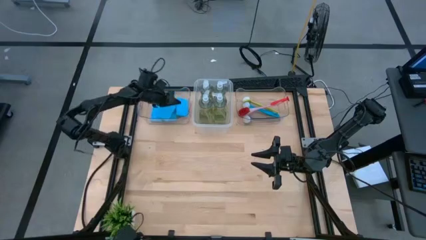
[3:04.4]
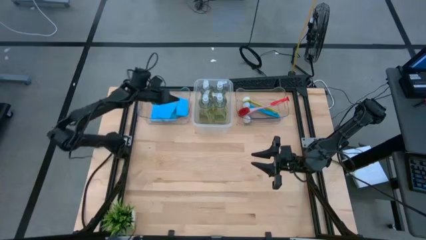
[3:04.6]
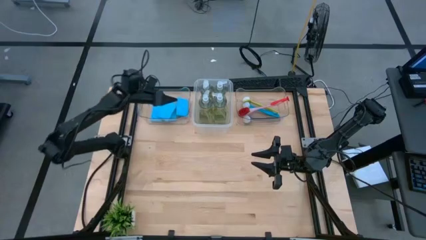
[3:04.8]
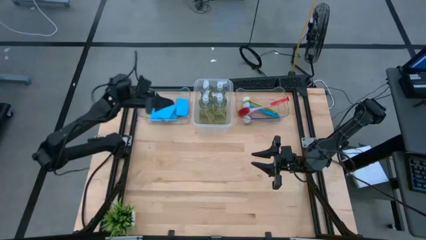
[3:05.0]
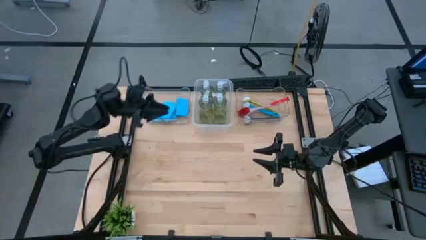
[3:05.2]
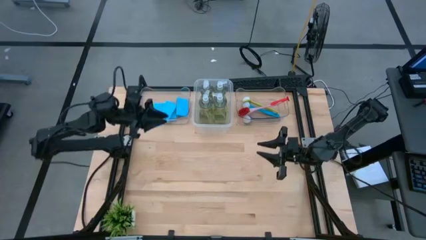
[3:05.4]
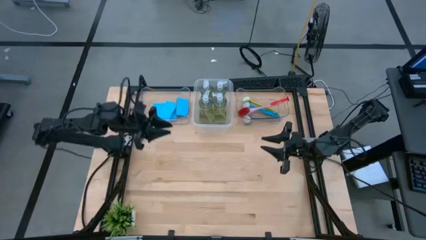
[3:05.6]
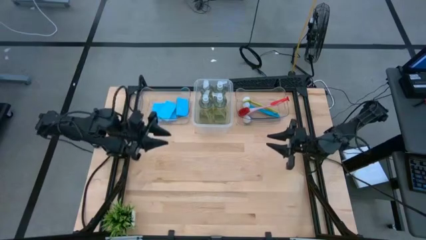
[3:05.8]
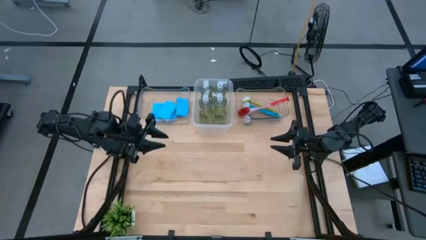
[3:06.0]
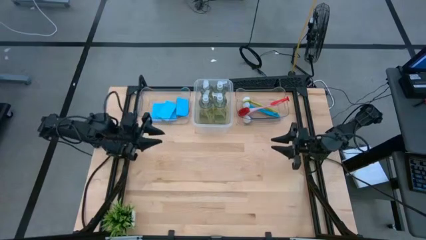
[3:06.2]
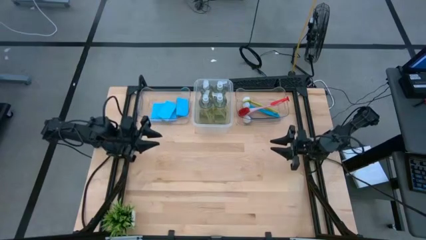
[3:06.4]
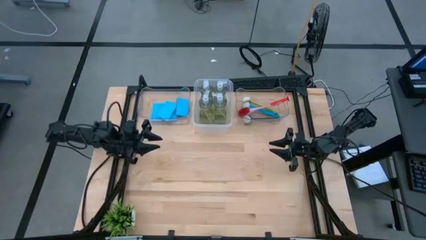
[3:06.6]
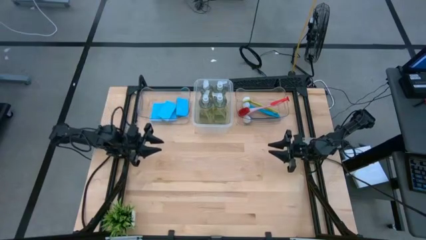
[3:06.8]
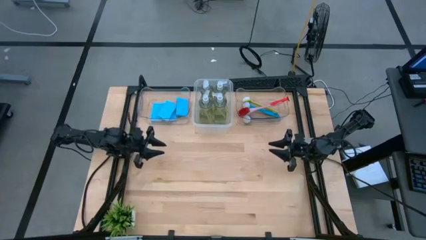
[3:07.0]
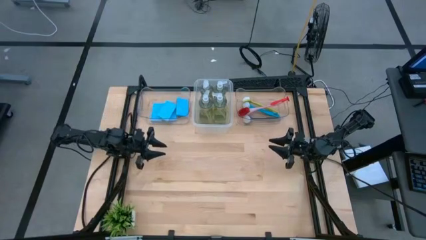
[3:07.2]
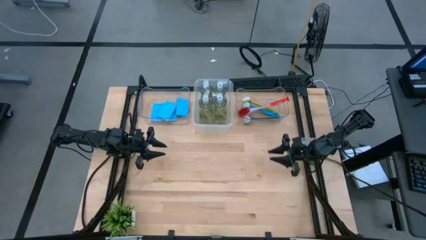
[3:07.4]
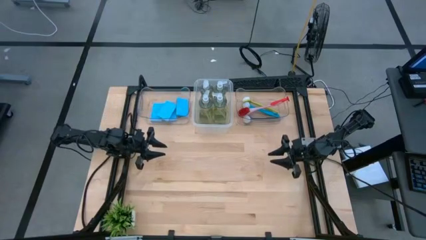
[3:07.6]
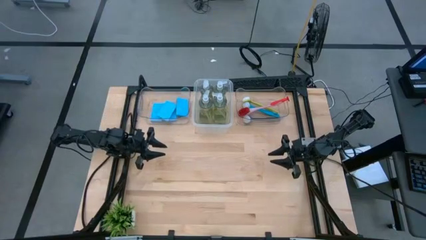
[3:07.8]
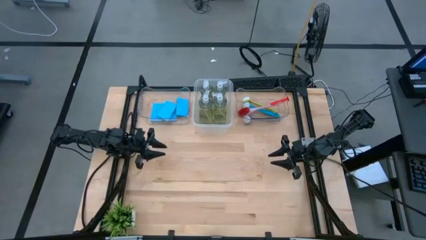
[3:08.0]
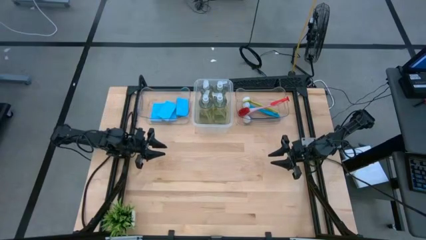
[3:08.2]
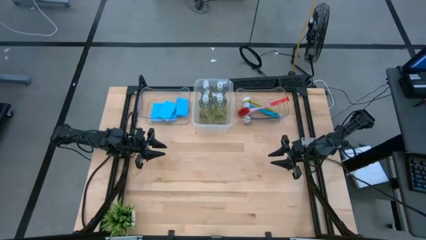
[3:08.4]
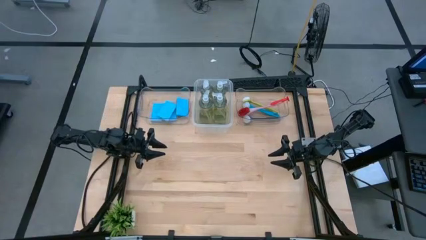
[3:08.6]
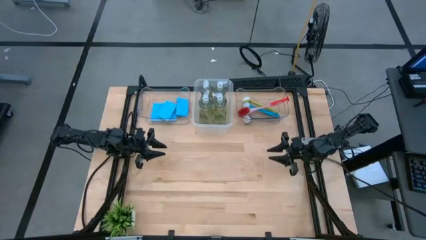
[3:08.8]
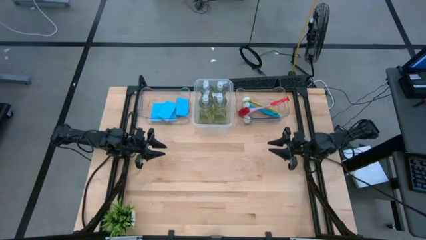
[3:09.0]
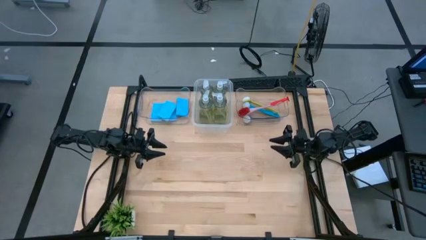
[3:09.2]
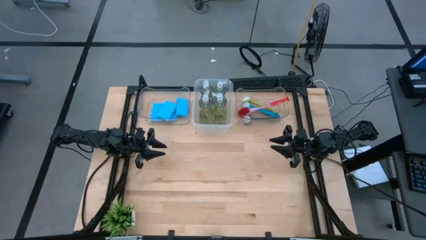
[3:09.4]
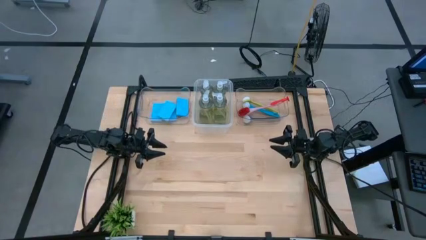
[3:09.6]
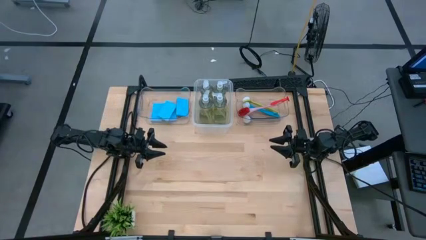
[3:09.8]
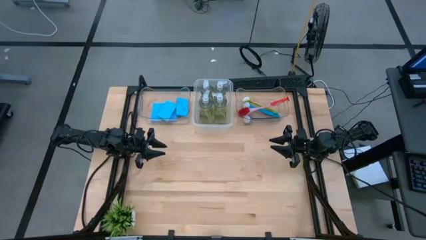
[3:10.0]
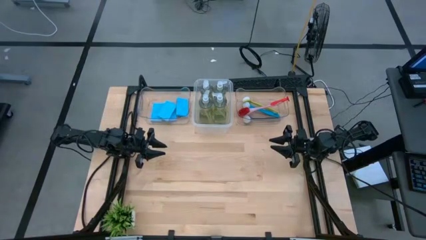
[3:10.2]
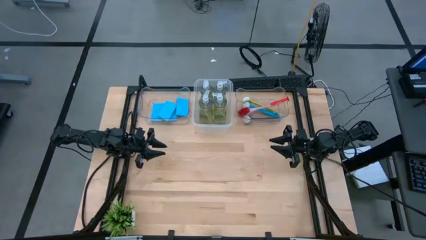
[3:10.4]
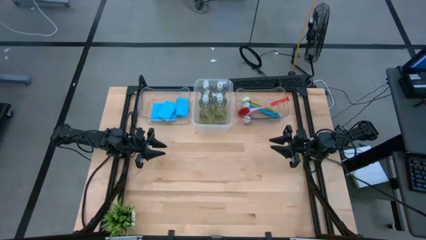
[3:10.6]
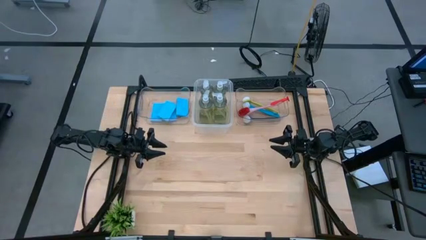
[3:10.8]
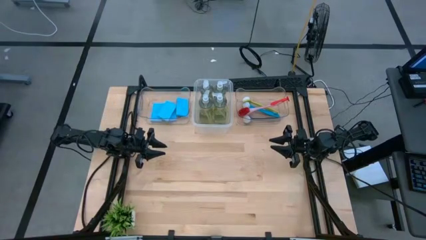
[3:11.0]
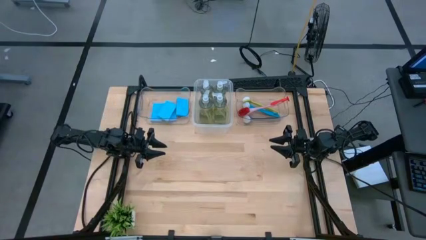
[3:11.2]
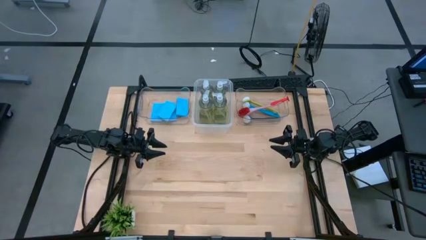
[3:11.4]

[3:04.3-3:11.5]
Task: Pick & Place Kitchen Sink Supplies
Return to Home Position

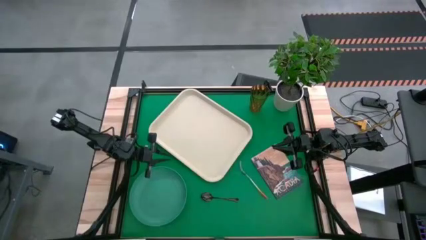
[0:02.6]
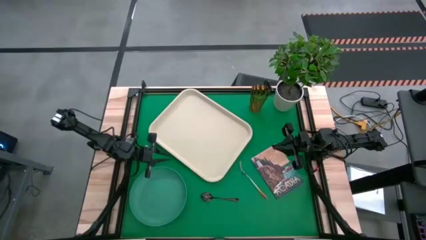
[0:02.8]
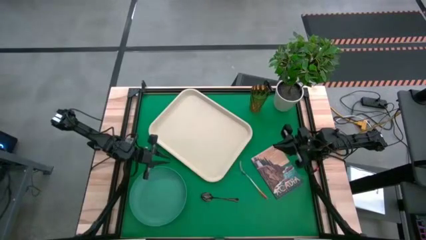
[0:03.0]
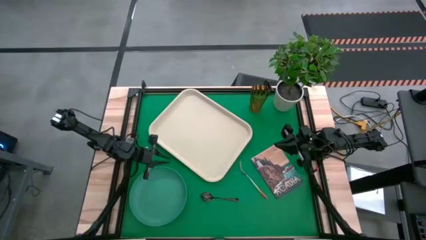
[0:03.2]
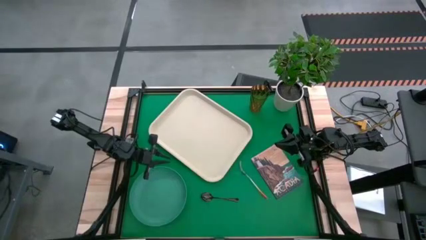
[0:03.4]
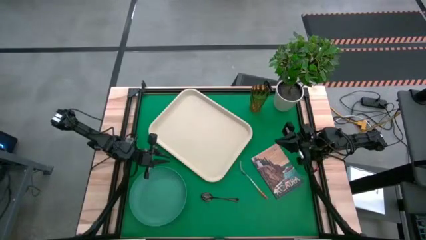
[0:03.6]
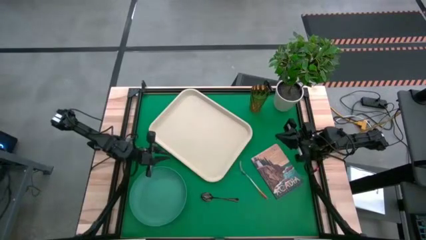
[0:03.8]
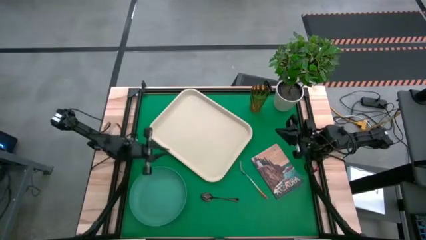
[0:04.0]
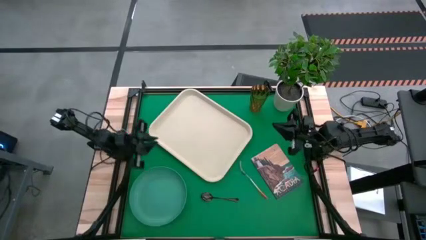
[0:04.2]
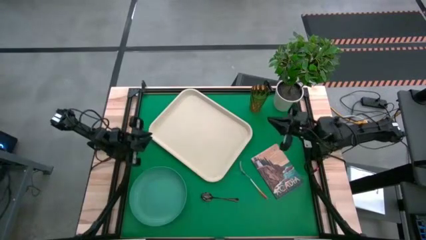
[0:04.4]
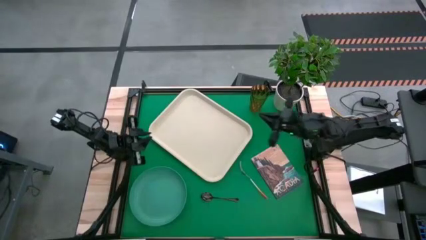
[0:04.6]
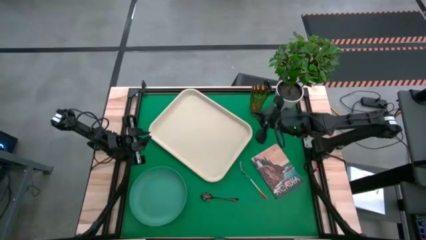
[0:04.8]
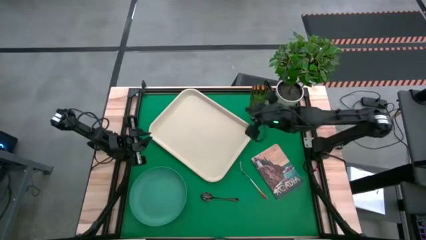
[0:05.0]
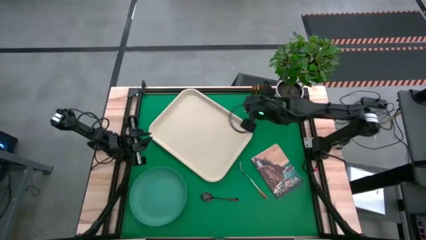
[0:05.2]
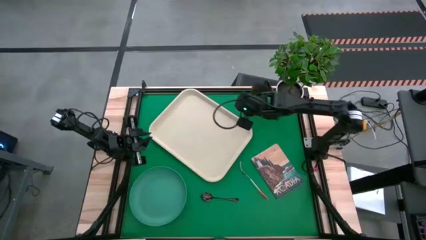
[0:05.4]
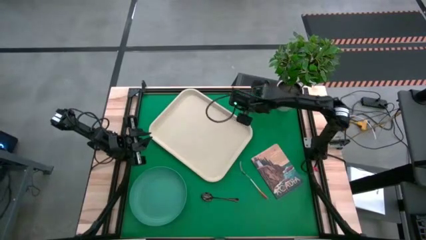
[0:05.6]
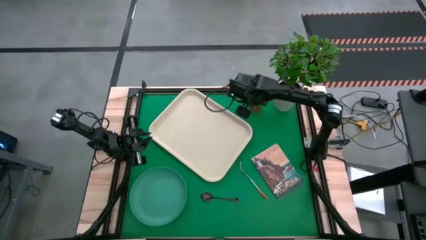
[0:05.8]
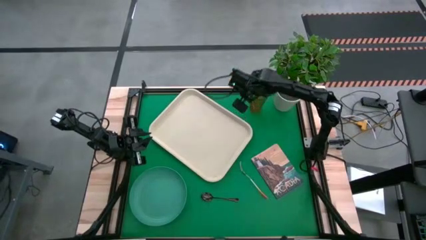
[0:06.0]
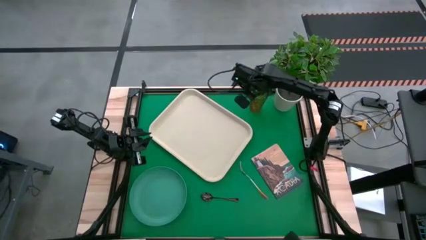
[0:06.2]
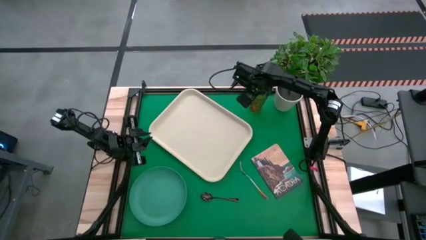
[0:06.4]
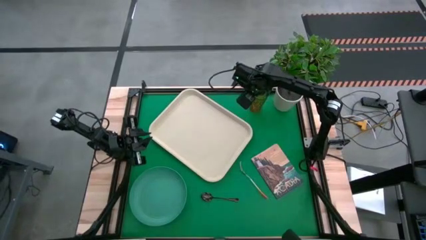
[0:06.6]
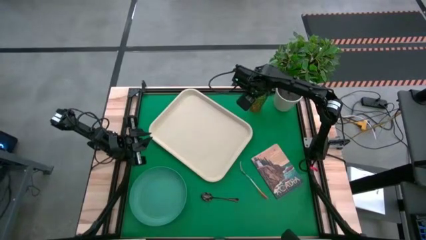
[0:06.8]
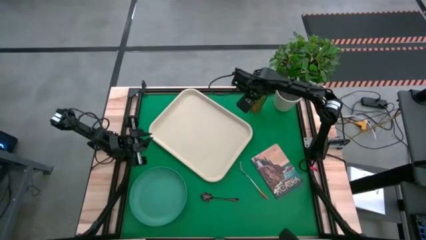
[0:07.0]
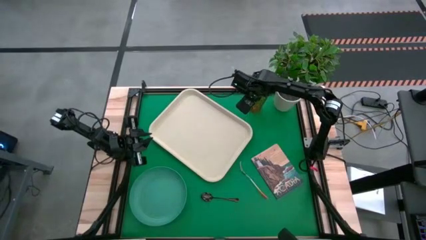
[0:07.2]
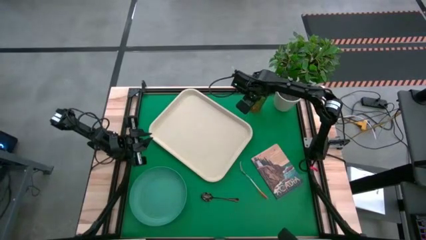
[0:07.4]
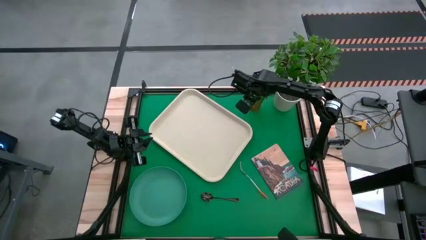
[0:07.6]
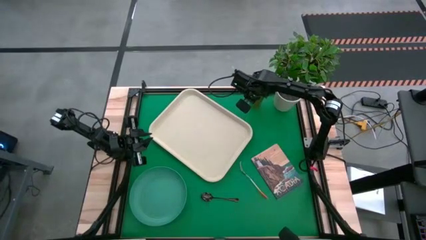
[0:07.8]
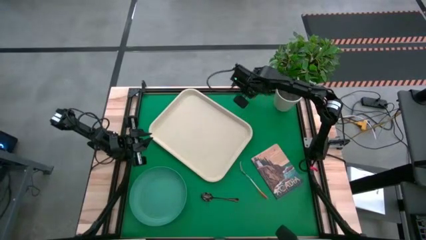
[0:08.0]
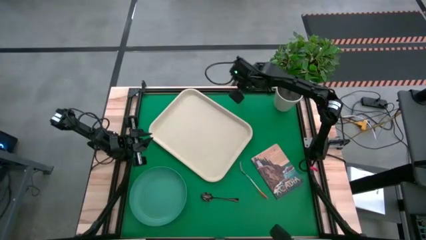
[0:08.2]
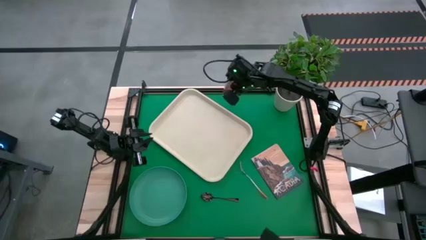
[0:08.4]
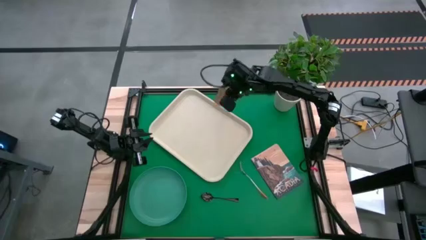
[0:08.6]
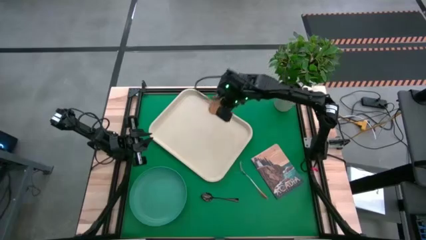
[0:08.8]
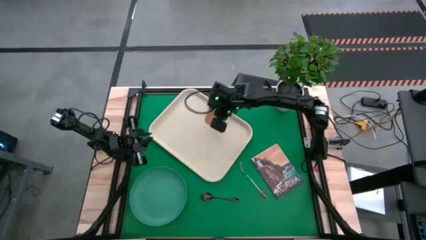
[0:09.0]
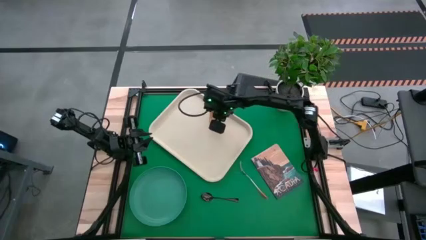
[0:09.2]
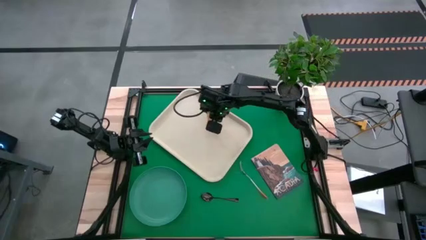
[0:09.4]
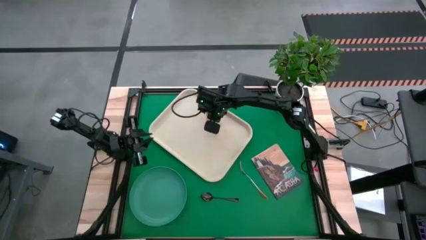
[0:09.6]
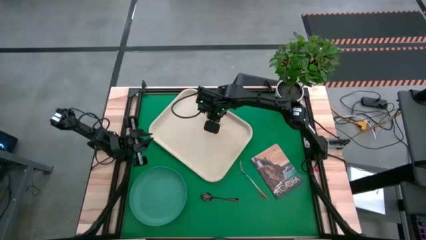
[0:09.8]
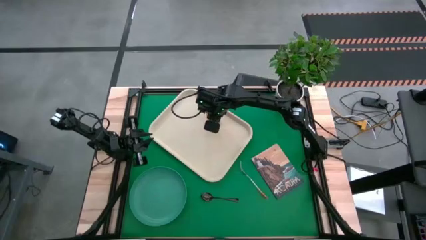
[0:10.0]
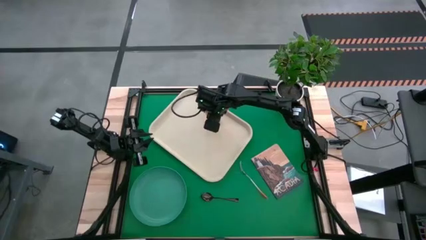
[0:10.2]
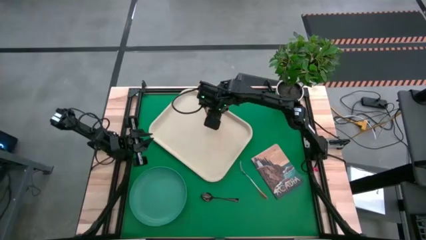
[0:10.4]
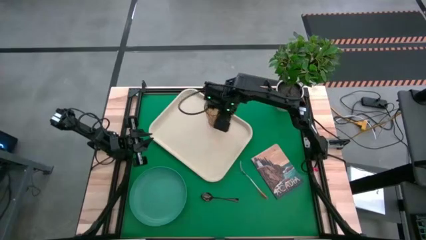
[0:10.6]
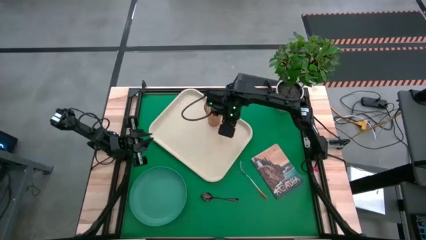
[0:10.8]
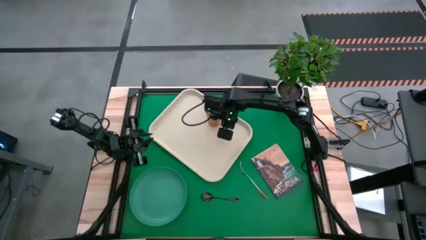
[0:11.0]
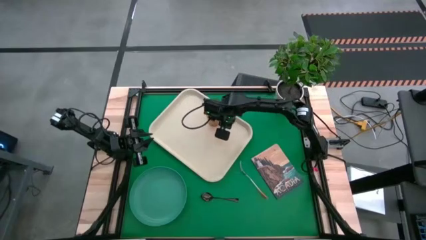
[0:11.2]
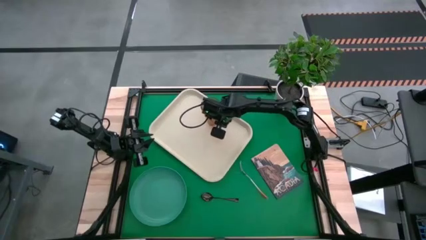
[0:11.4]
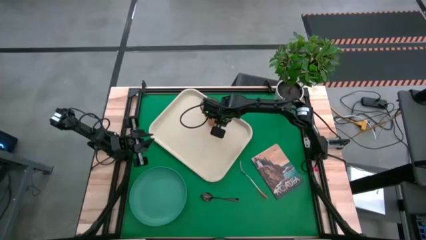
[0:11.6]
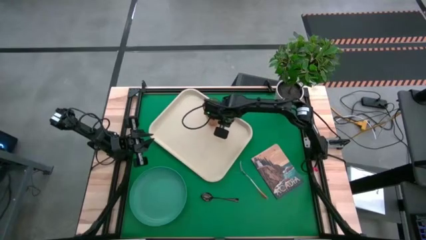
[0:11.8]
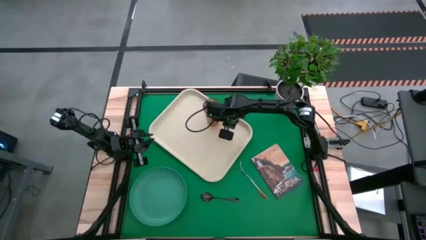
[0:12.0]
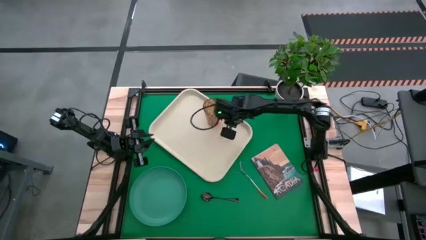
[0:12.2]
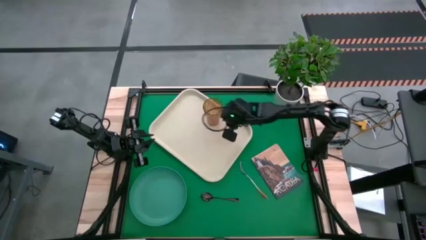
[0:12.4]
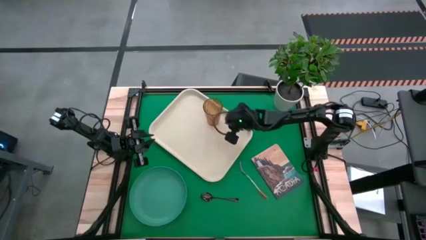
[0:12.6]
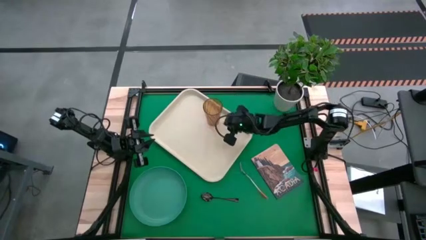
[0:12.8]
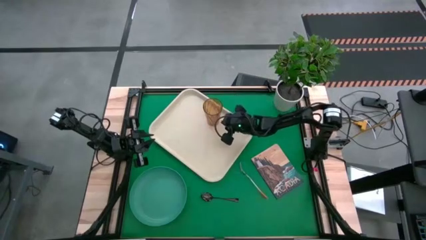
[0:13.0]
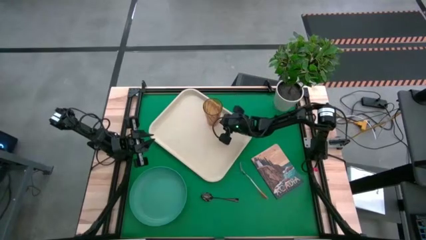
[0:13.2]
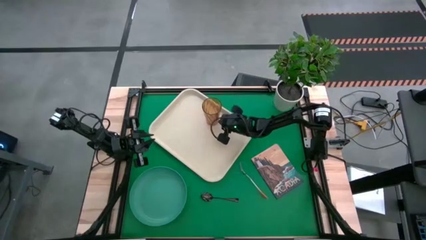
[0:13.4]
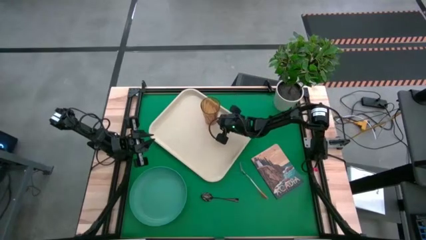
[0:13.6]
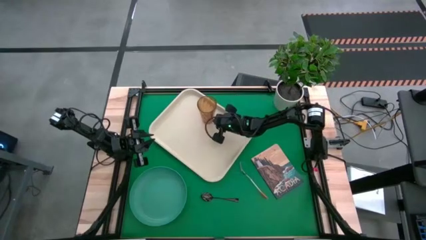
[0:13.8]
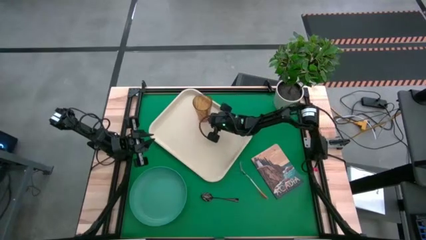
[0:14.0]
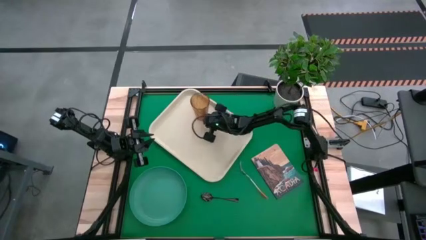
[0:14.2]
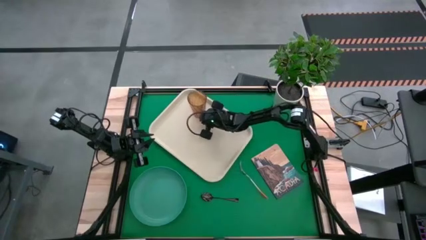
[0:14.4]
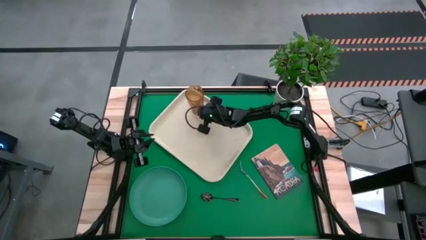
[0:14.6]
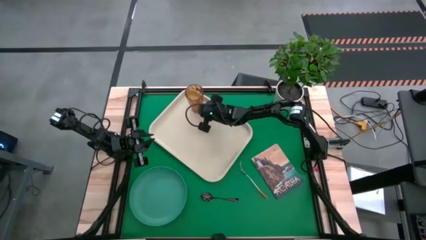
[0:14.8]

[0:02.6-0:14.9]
Task: Pick and place plate/cup/fork/spoon on tray
Put the yellow glass on the white tray
